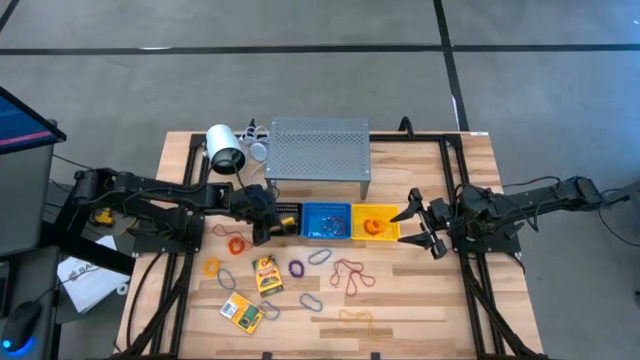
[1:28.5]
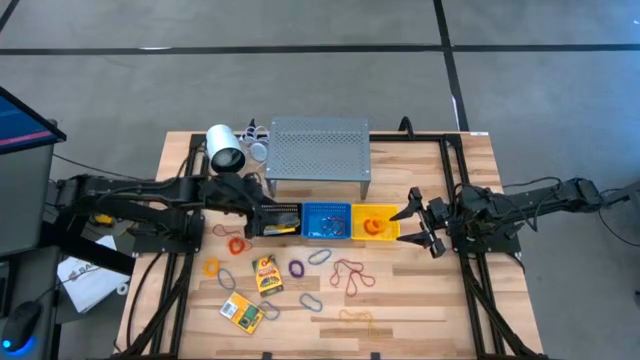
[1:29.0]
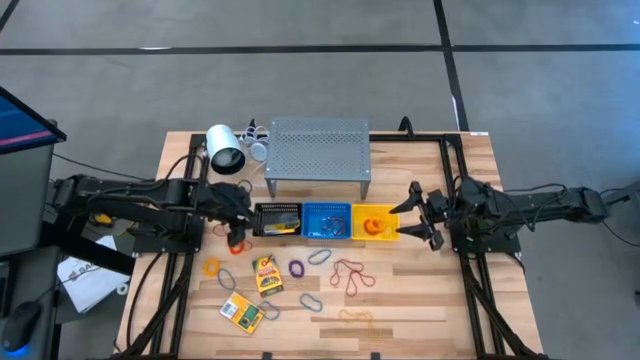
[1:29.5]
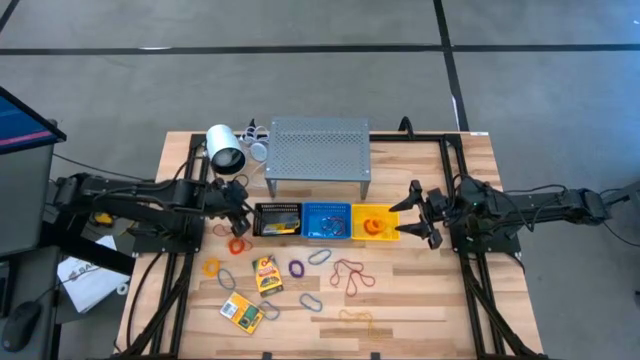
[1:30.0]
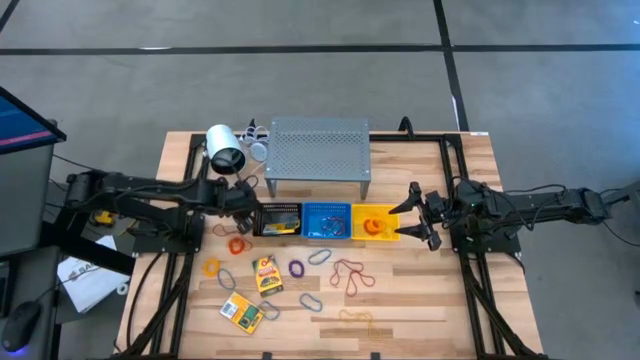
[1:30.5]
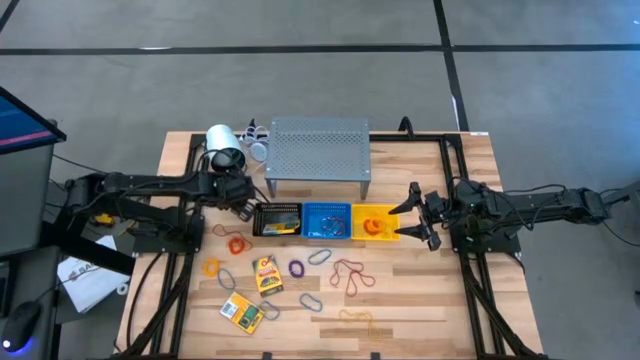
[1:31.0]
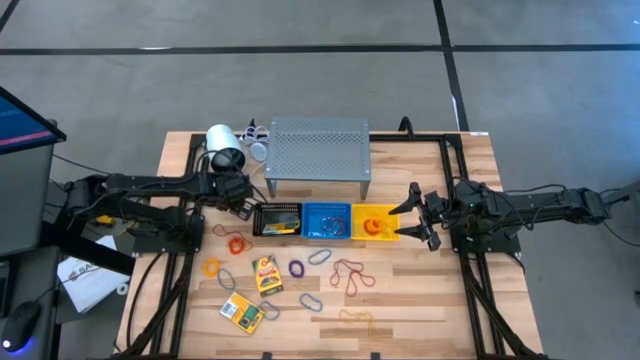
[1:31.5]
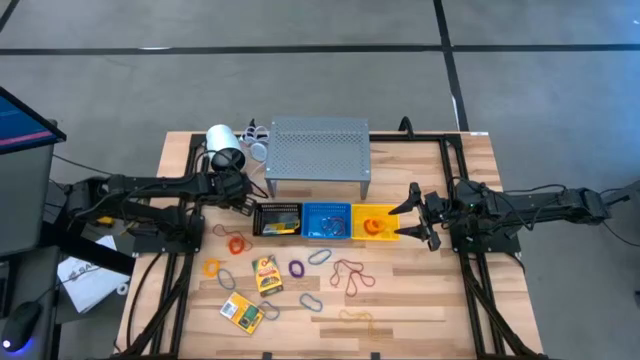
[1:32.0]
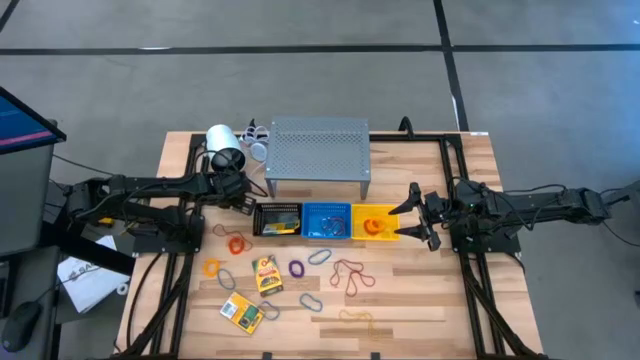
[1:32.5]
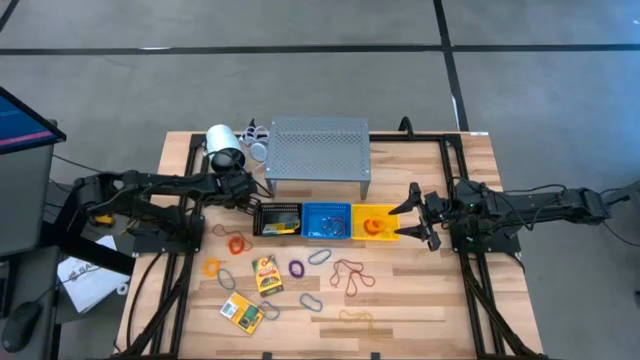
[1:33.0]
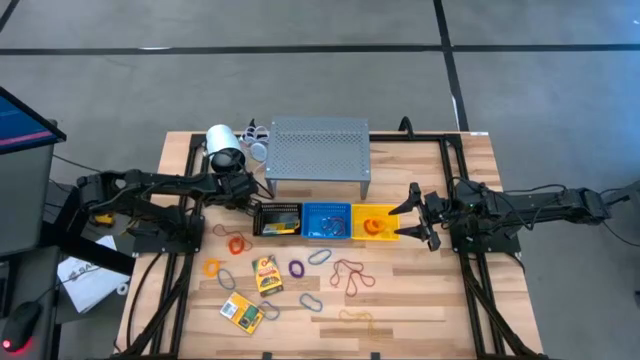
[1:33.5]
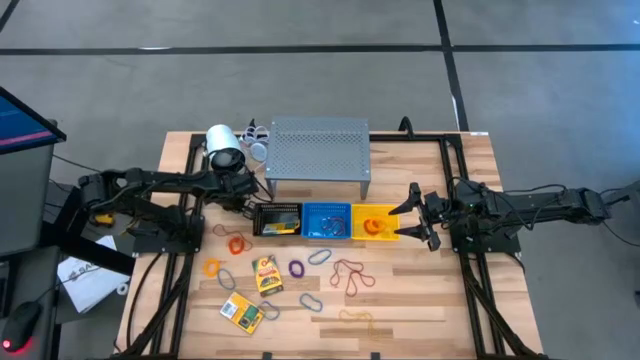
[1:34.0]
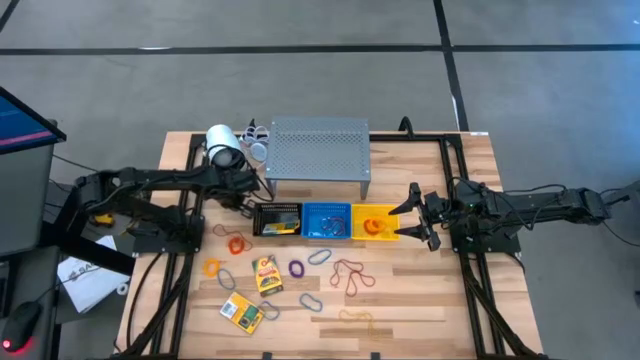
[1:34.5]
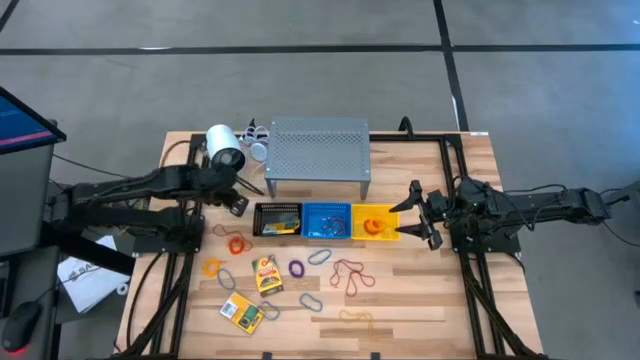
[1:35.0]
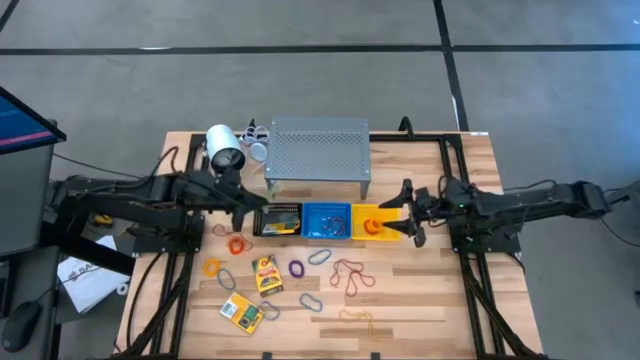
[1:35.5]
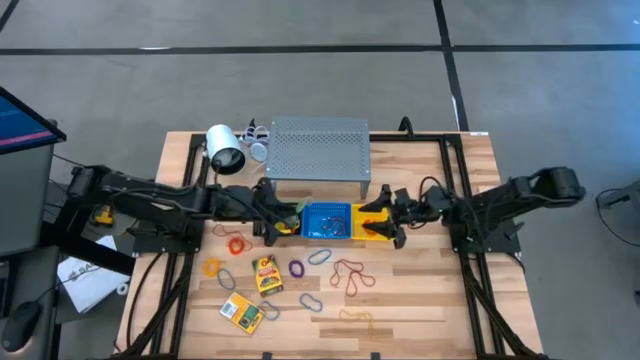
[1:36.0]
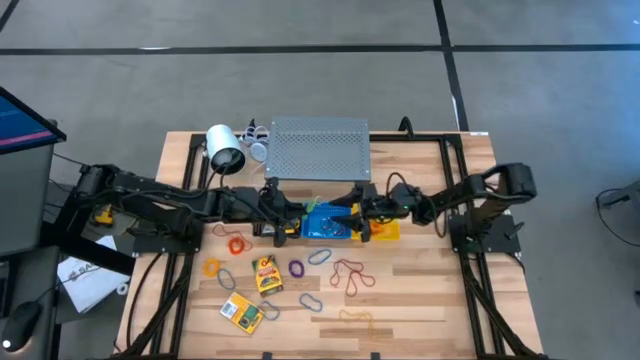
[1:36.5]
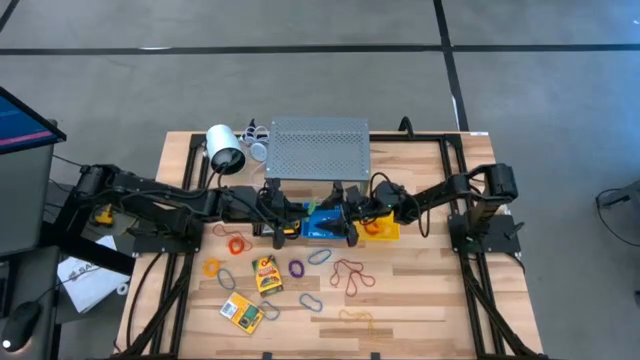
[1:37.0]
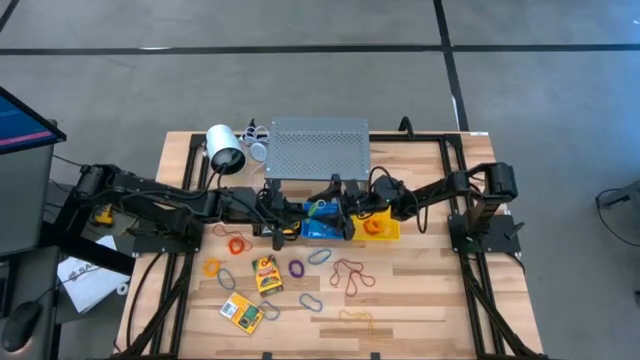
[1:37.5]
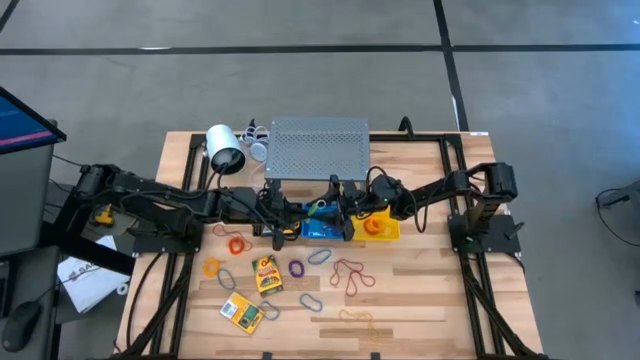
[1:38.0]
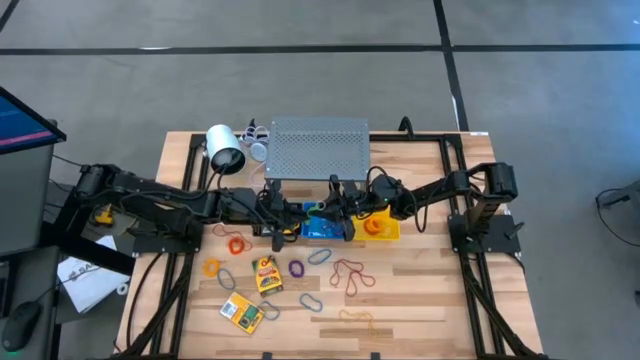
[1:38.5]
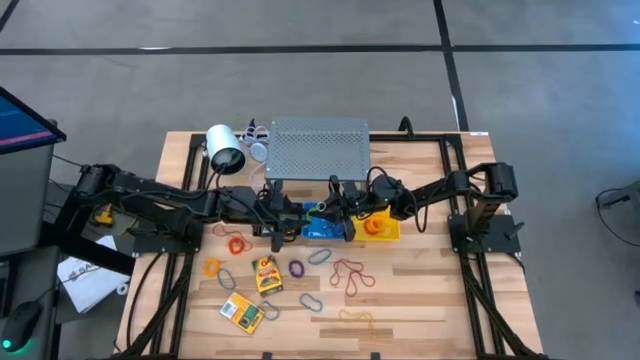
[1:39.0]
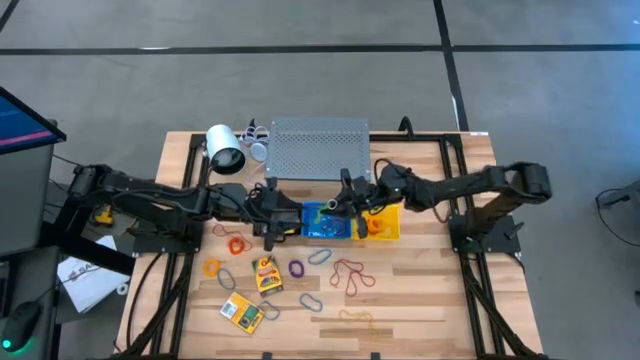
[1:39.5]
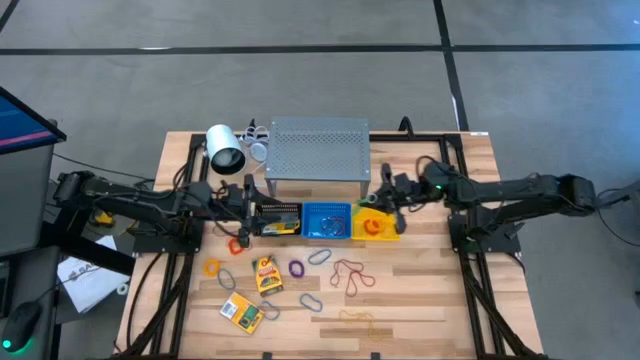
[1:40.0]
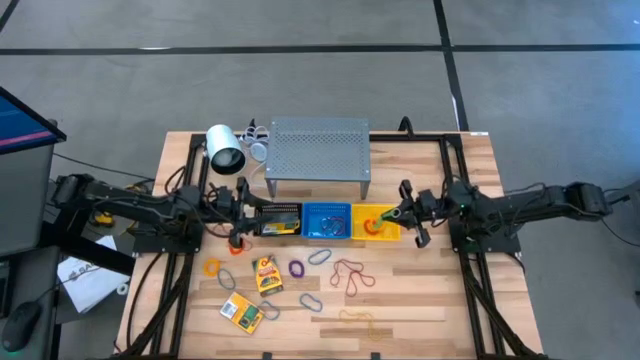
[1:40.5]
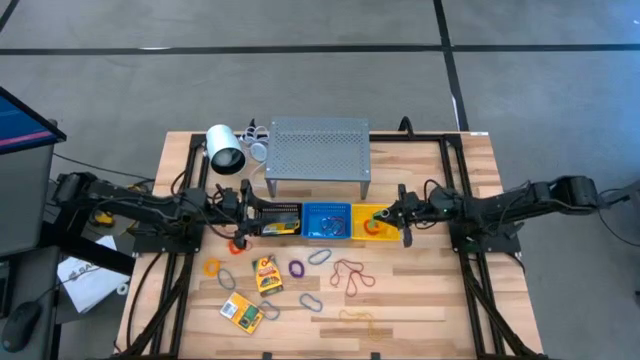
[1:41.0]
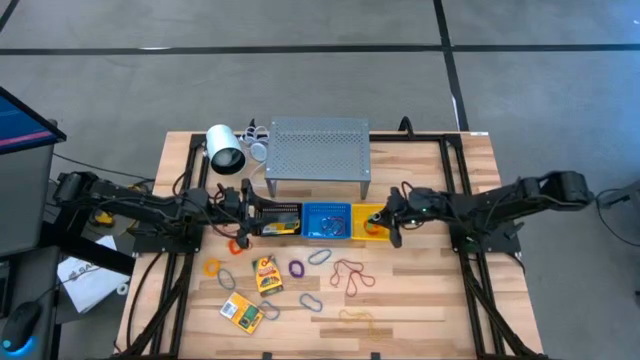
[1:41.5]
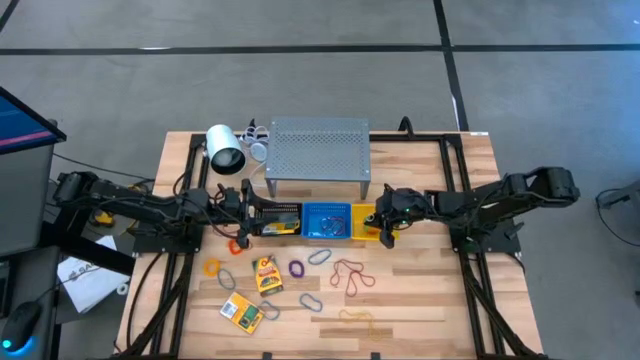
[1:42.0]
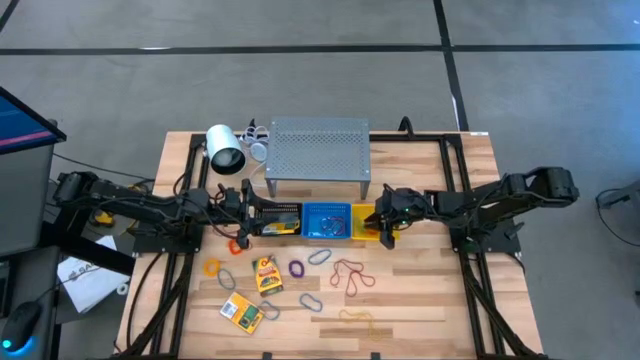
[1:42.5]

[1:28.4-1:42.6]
Task: Pick & Place Office Desk Supplies
Put the right green spiral keychain into the yellow bin

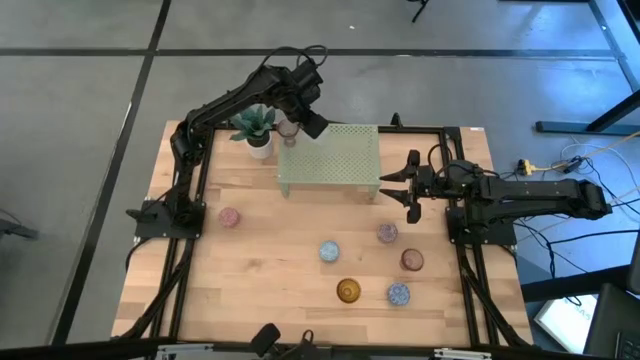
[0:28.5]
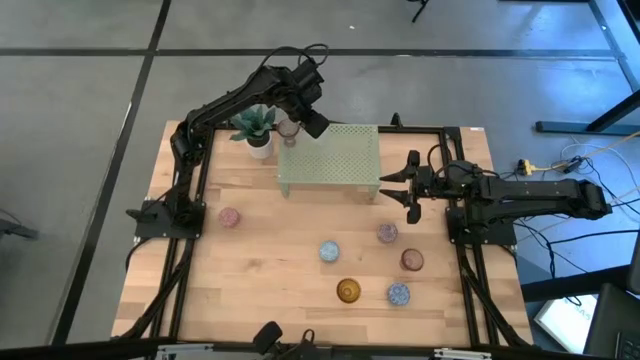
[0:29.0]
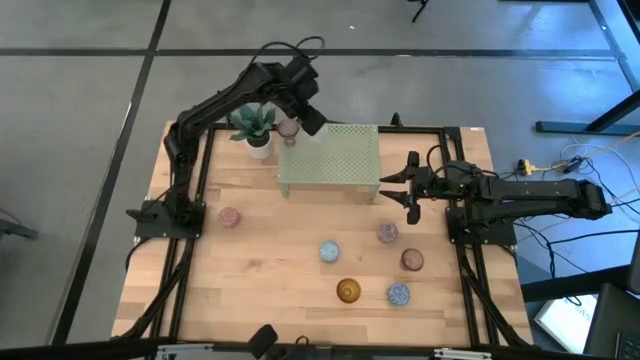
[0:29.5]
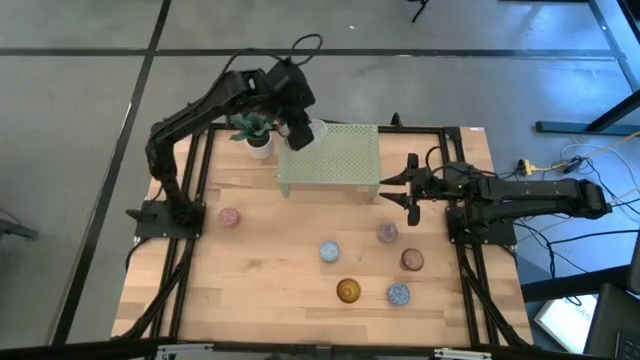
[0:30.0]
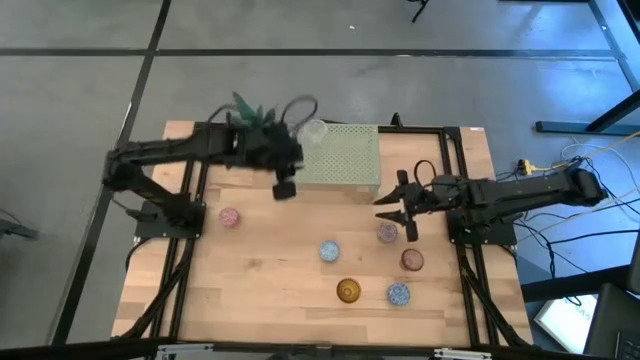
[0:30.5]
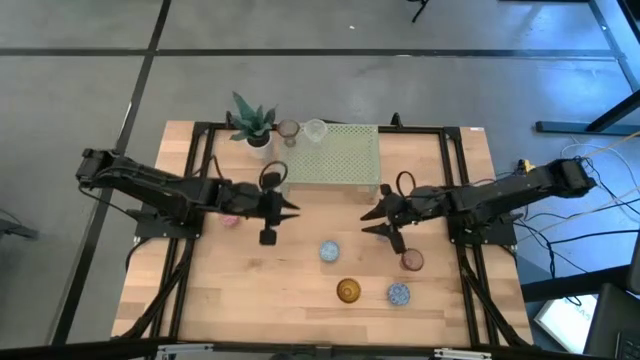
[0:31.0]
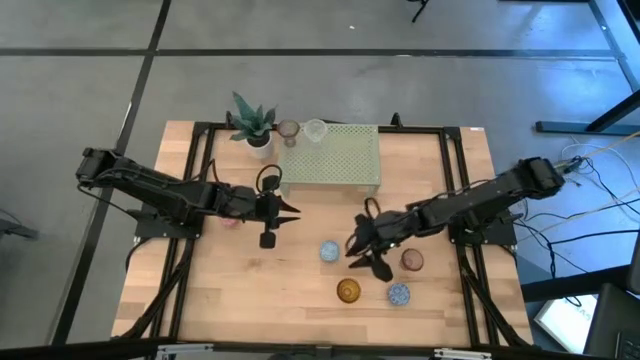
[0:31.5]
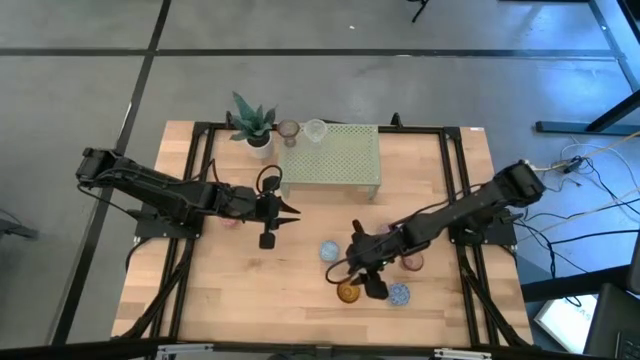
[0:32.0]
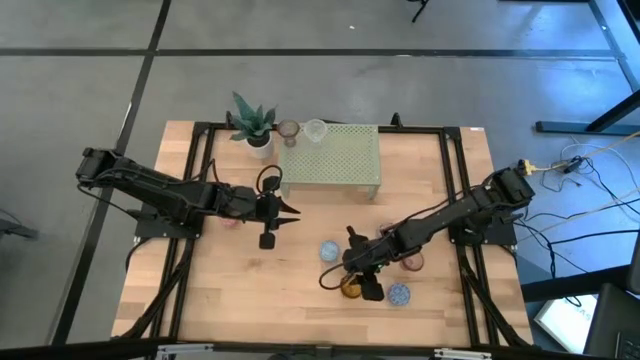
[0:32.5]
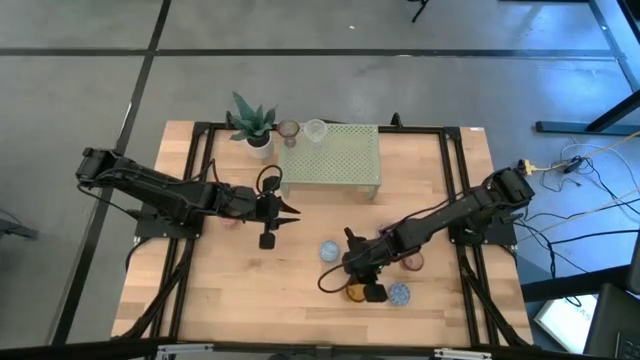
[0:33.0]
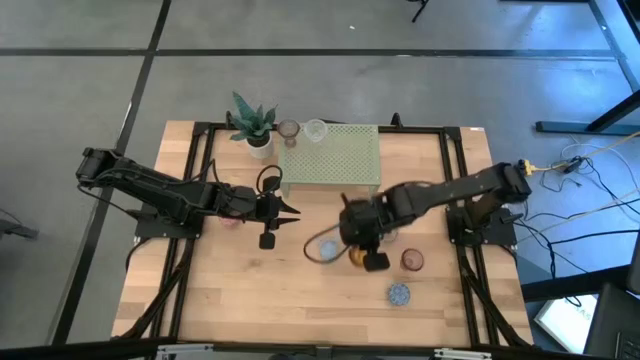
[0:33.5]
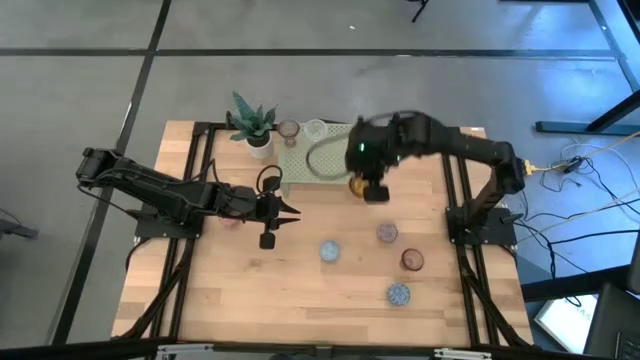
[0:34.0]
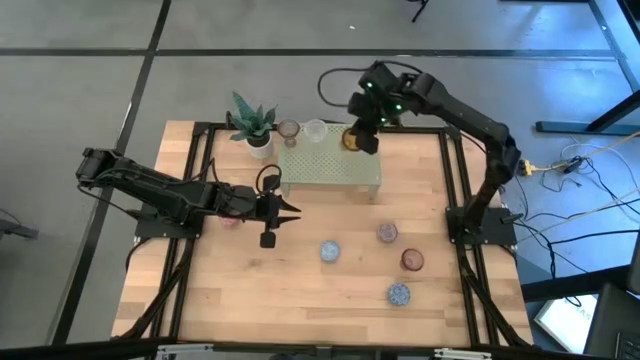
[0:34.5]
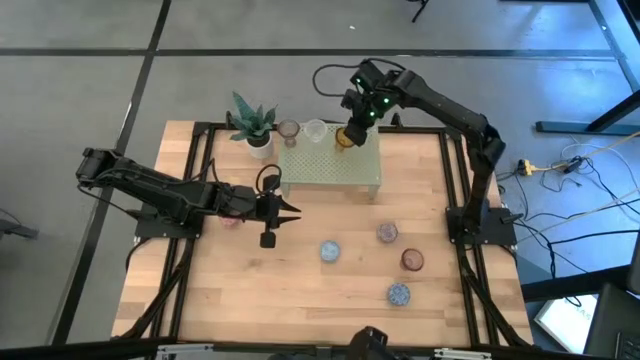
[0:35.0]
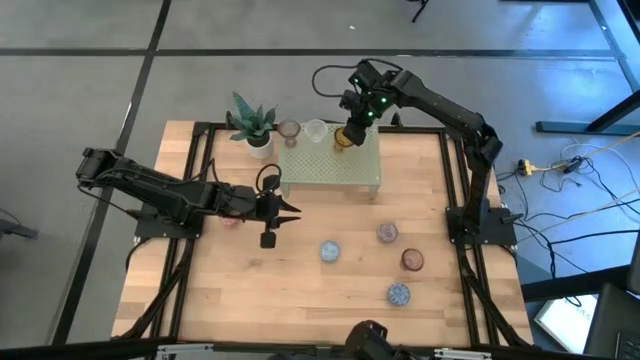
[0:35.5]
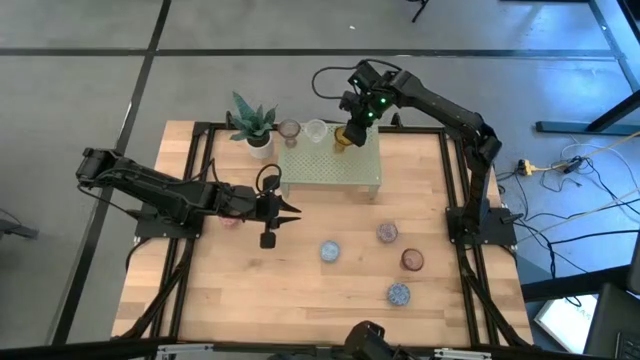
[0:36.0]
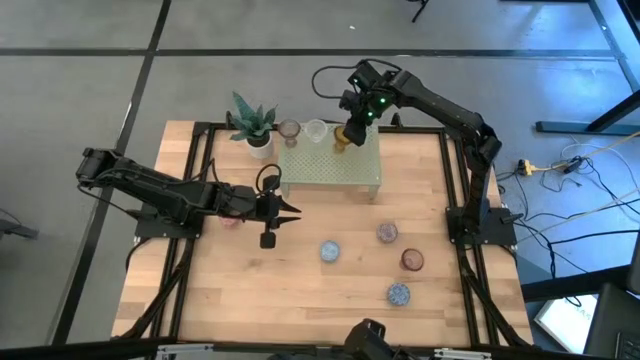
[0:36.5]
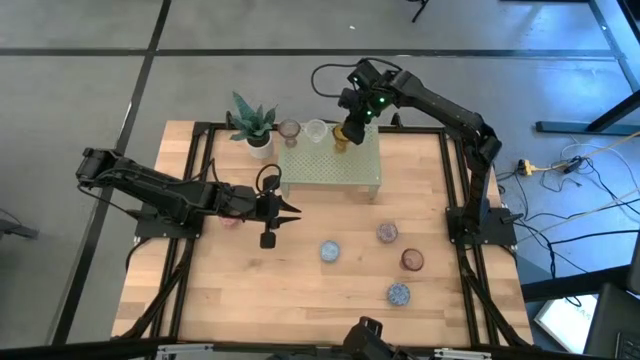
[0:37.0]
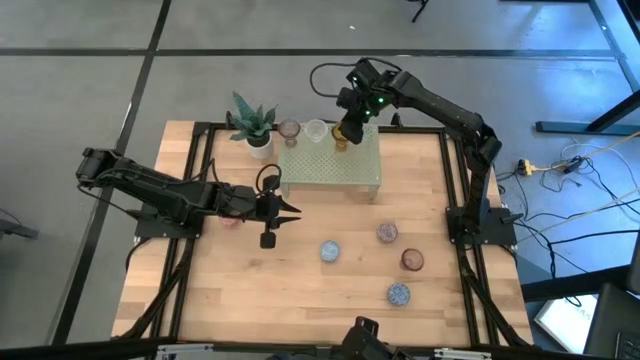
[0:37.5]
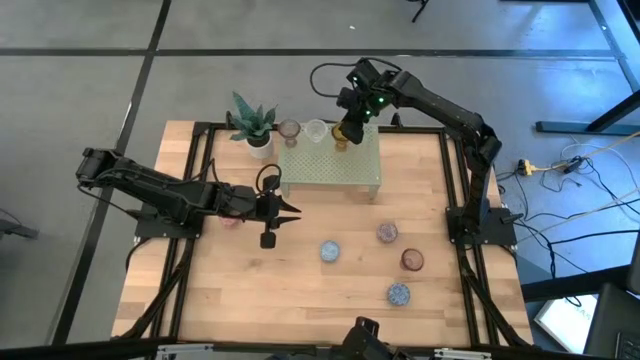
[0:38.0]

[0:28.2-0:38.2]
Task: Pick & Place candle stick holders
Put the yellow glass candle holder on the shelf
